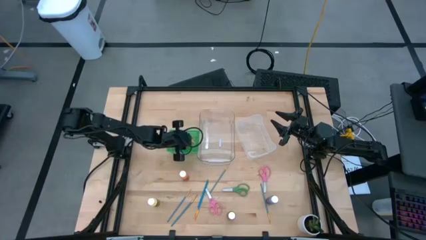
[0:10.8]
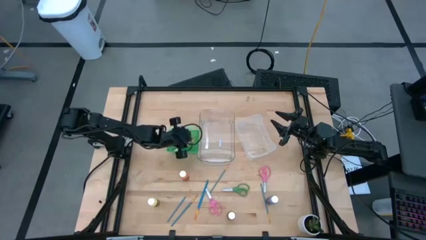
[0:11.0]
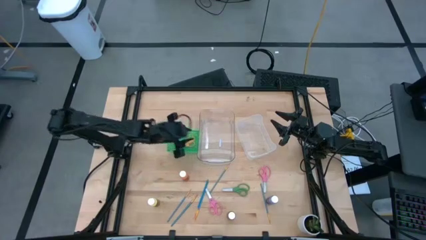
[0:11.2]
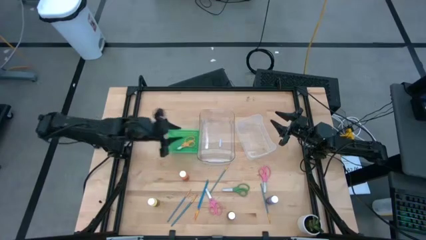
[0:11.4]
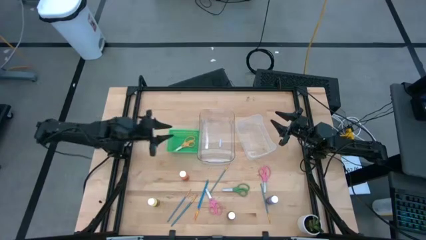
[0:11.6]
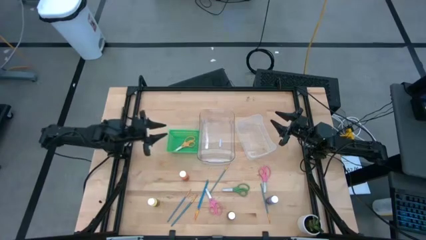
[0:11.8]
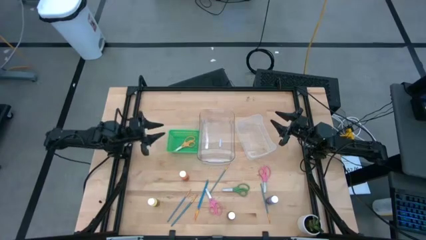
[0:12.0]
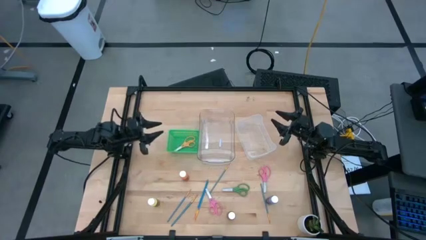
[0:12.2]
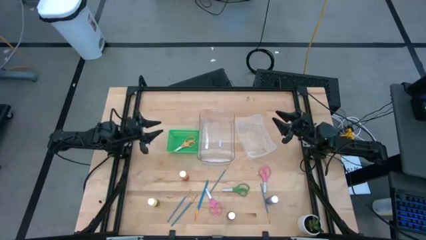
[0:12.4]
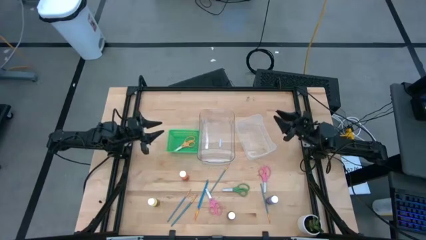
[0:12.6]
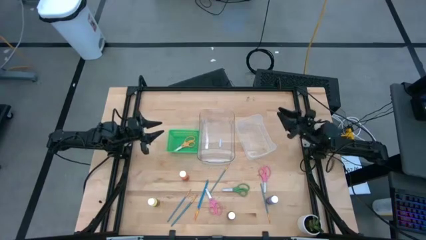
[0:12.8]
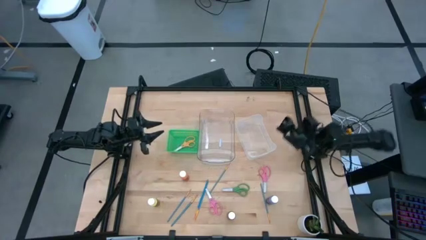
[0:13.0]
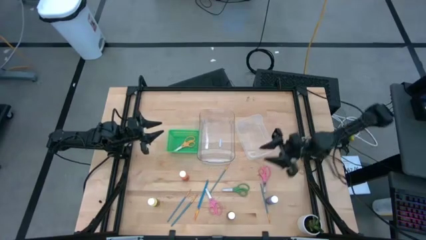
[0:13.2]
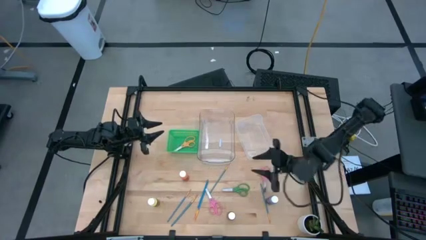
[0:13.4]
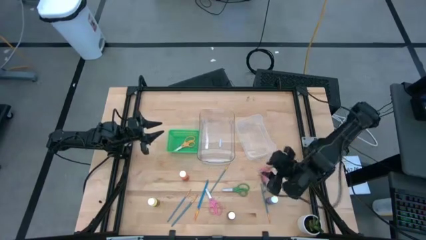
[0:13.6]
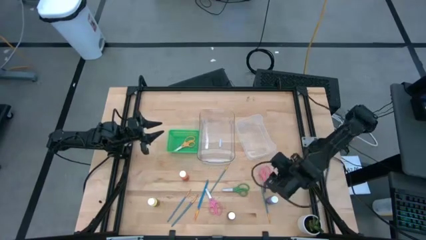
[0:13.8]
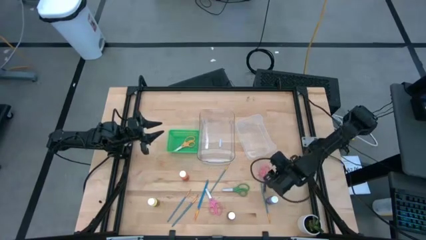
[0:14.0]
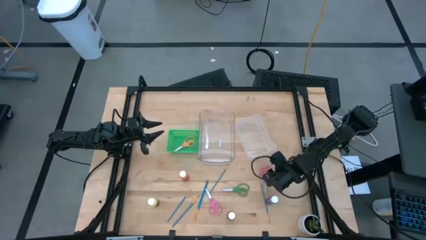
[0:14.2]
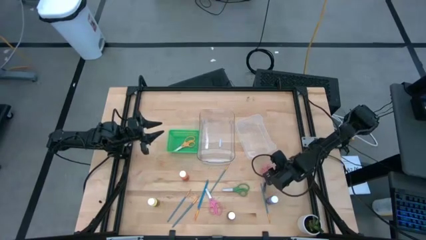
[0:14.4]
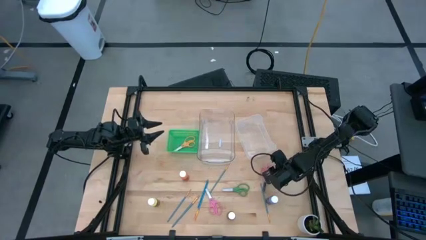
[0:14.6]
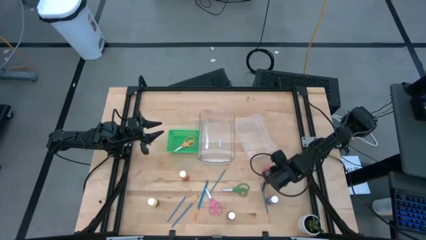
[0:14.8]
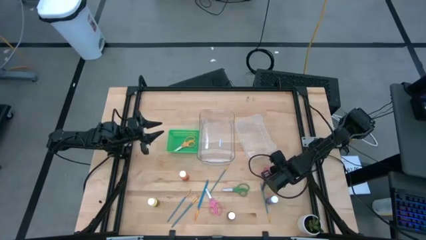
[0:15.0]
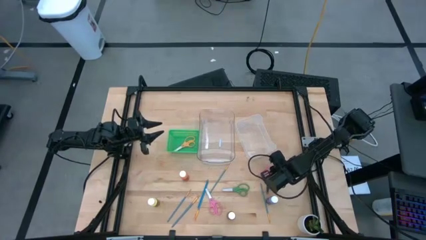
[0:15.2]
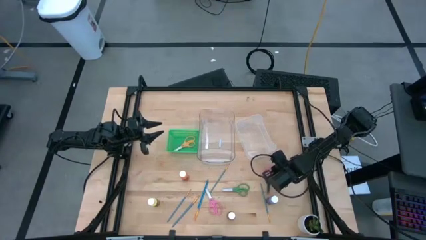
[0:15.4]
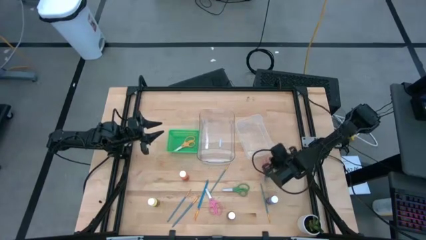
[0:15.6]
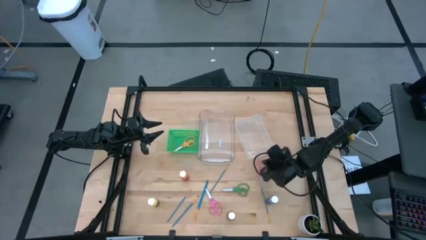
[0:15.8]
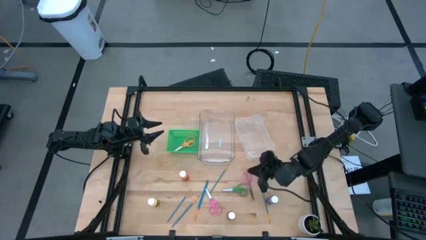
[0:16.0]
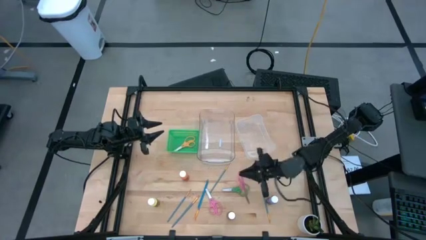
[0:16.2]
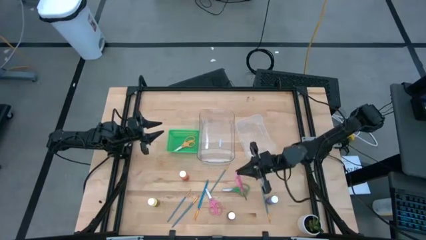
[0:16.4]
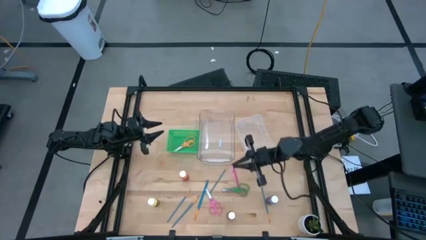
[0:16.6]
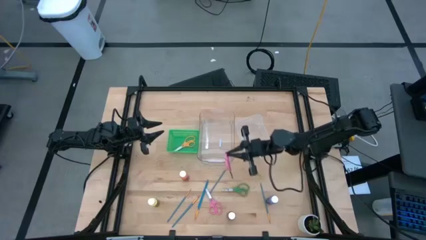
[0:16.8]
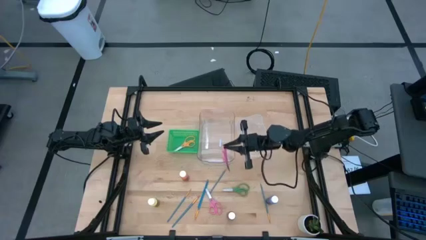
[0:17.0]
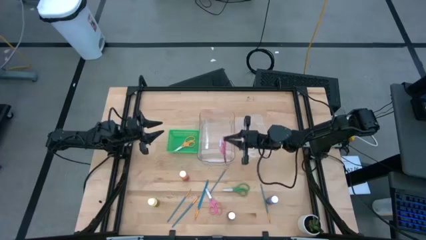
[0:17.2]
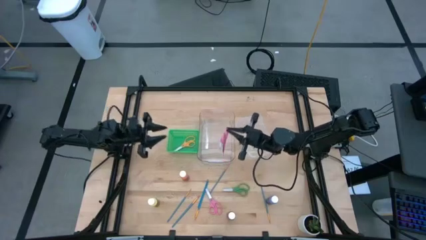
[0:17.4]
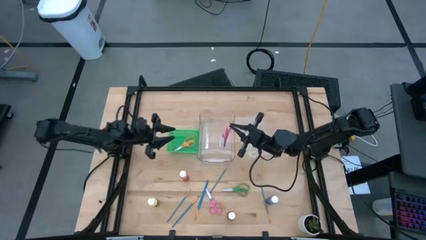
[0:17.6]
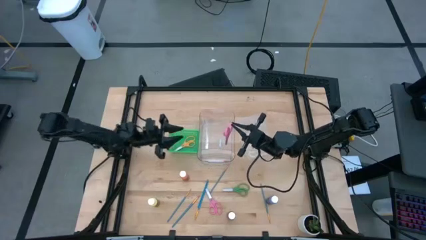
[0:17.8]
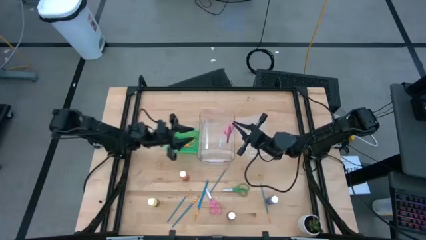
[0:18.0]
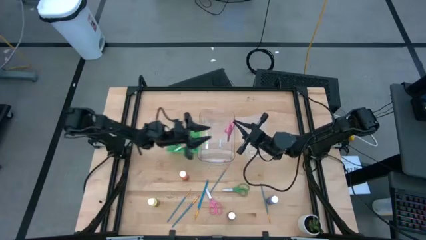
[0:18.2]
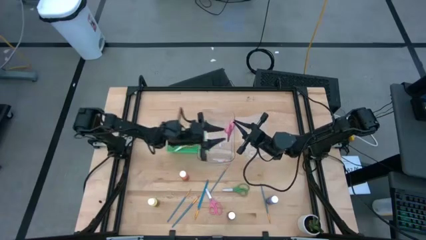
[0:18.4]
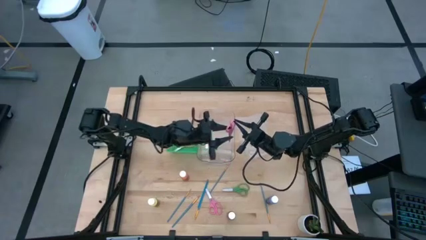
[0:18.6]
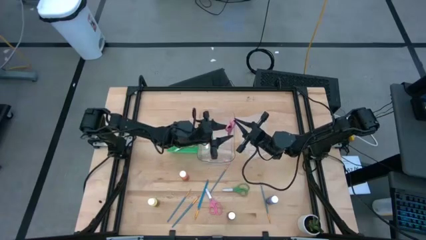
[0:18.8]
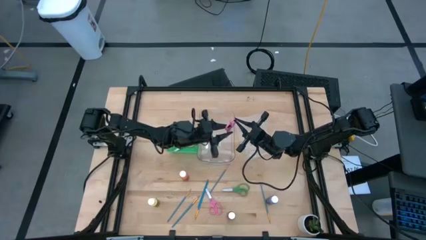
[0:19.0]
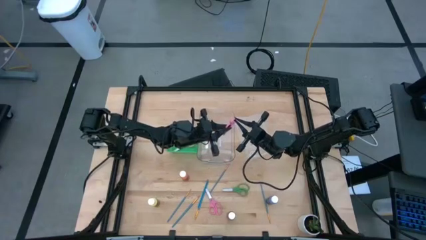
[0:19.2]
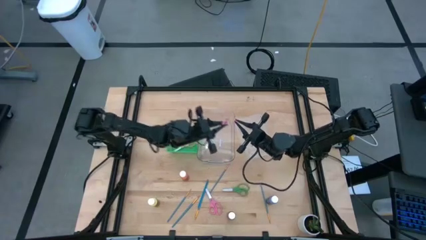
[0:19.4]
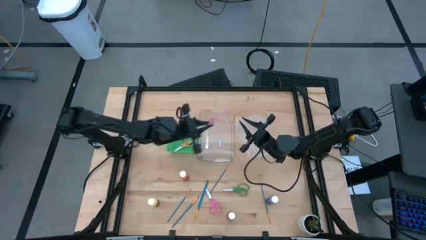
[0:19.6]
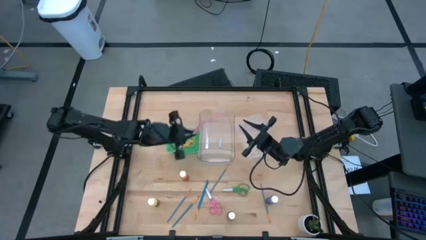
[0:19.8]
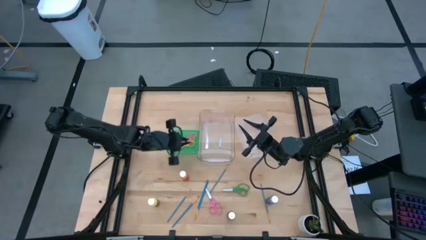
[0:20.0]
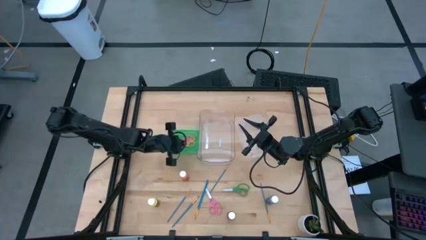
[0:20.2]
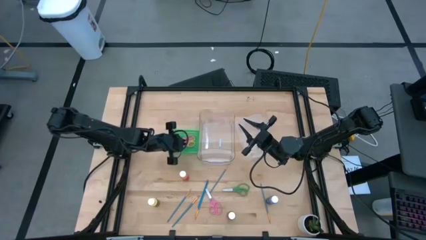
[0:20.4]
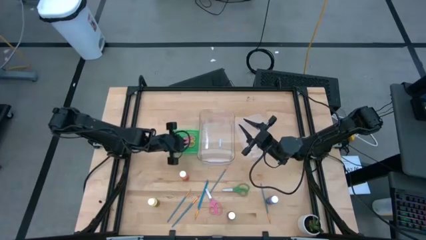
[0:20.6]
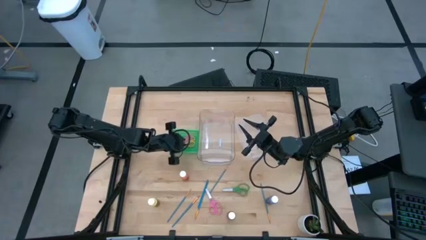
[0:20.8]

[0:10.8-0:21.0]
Task: Pick & Place Paint Supplies
Put the pink scissors into the green bin

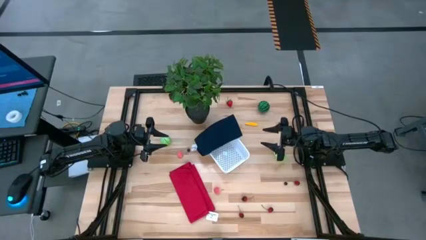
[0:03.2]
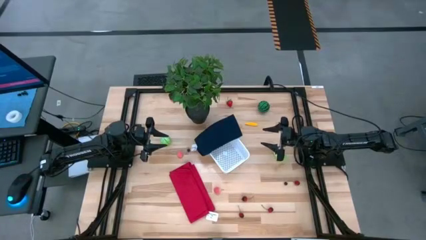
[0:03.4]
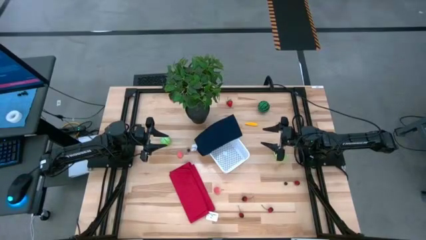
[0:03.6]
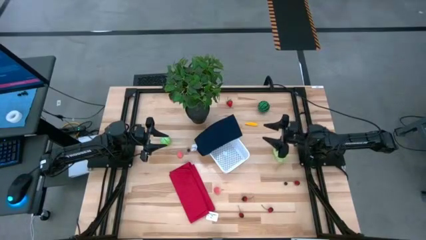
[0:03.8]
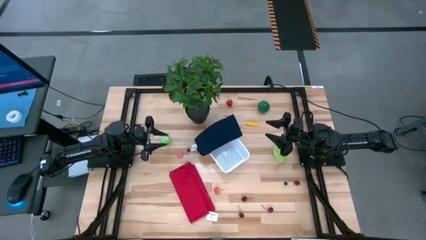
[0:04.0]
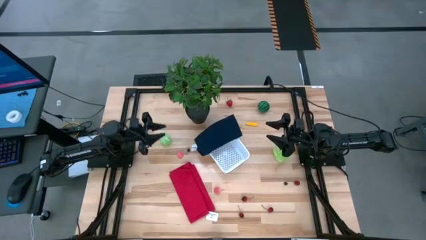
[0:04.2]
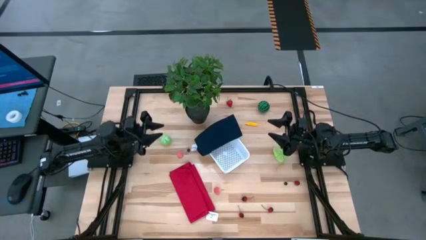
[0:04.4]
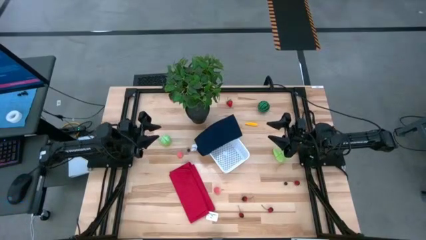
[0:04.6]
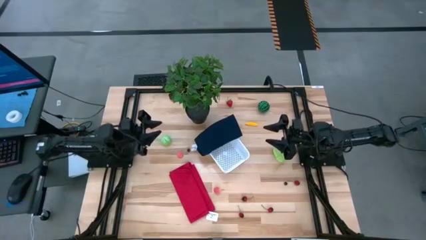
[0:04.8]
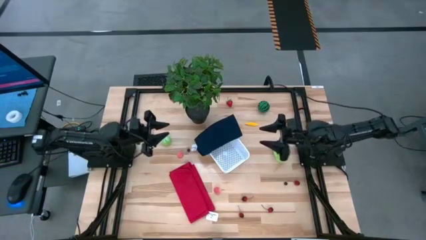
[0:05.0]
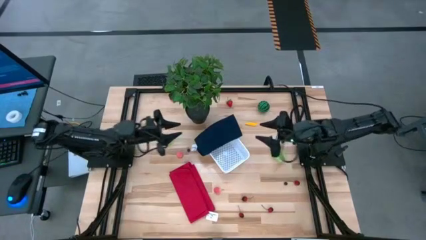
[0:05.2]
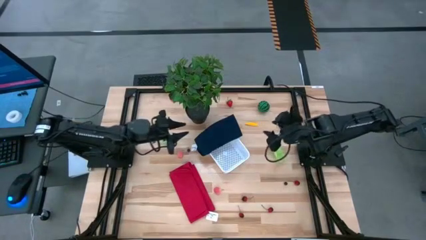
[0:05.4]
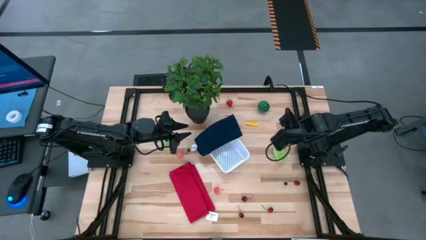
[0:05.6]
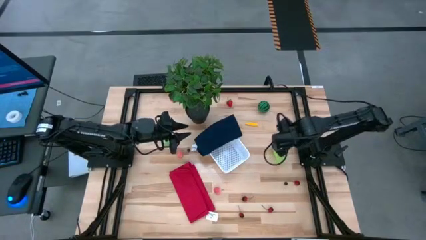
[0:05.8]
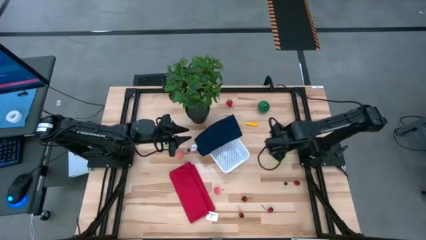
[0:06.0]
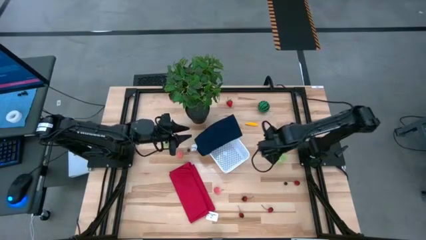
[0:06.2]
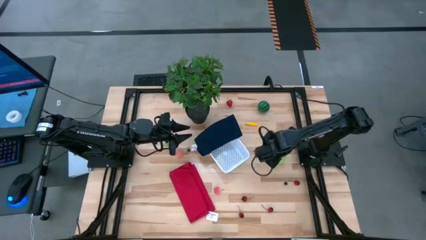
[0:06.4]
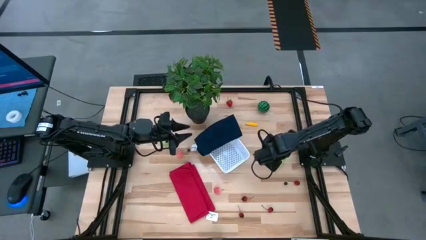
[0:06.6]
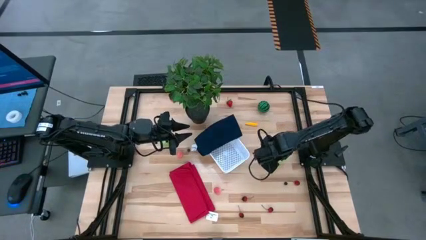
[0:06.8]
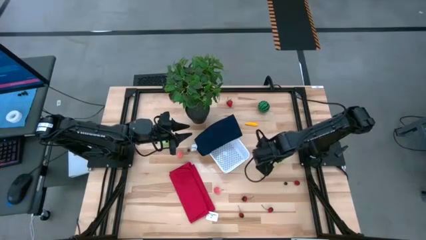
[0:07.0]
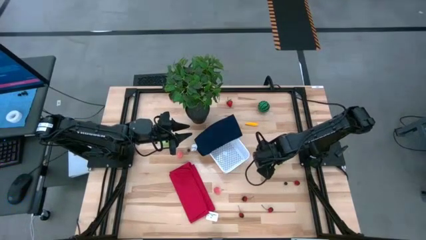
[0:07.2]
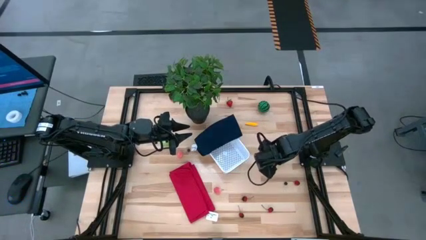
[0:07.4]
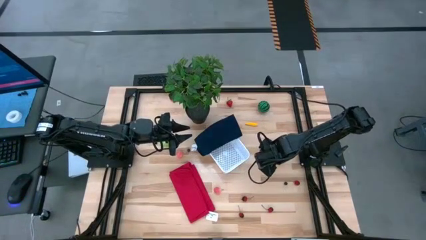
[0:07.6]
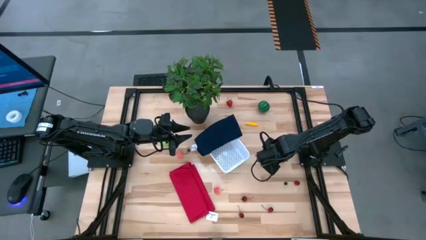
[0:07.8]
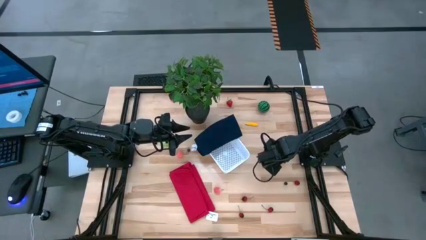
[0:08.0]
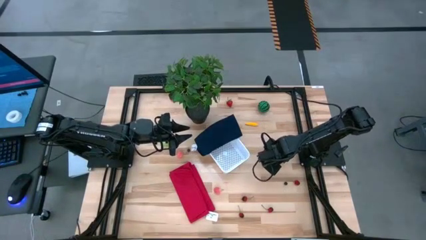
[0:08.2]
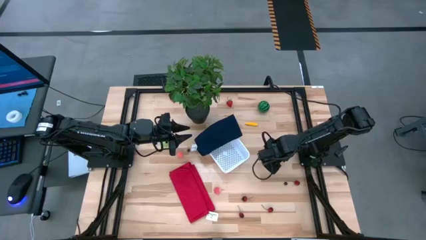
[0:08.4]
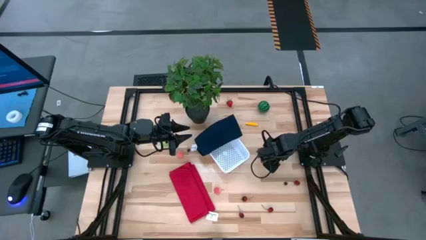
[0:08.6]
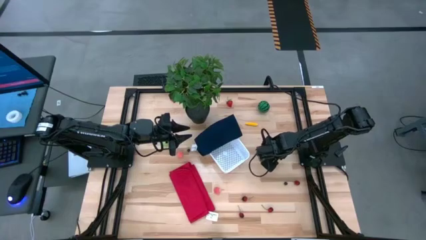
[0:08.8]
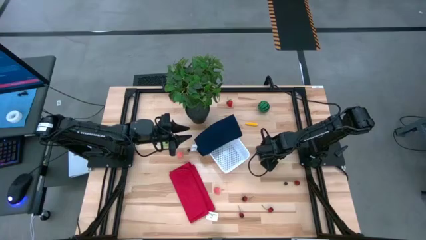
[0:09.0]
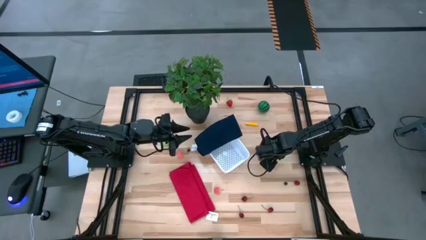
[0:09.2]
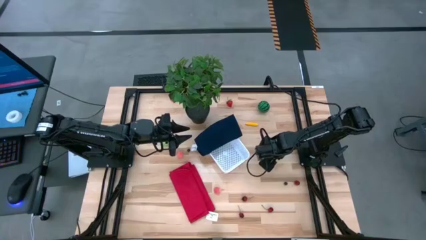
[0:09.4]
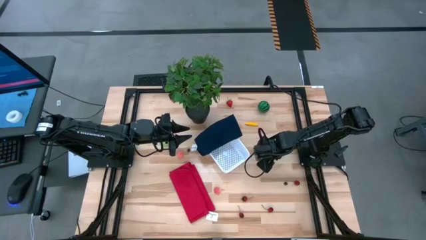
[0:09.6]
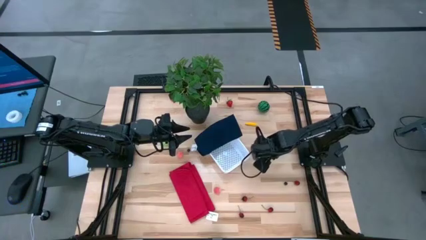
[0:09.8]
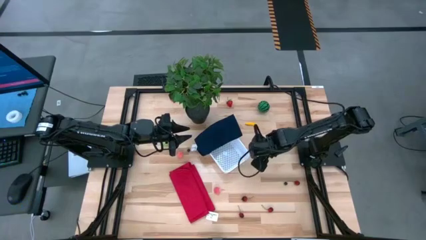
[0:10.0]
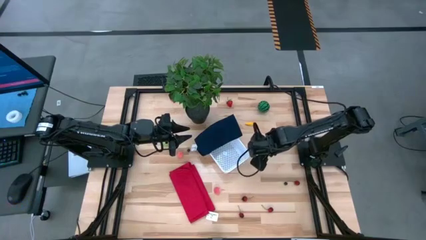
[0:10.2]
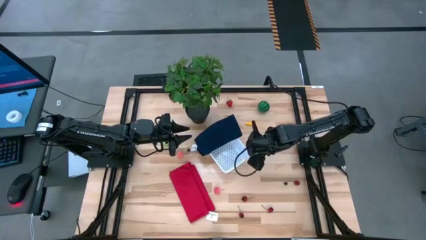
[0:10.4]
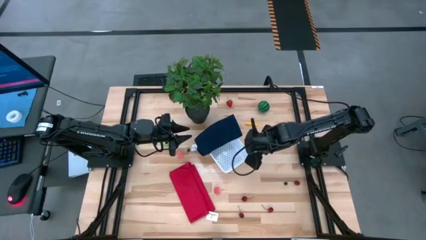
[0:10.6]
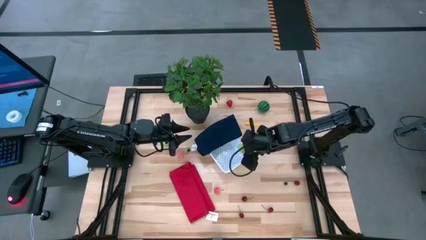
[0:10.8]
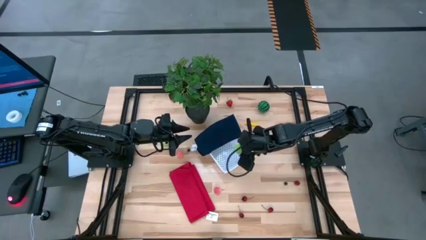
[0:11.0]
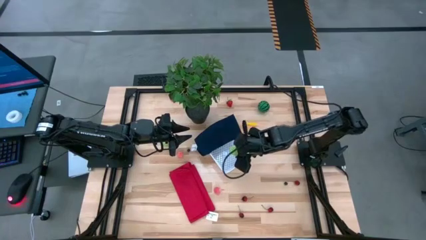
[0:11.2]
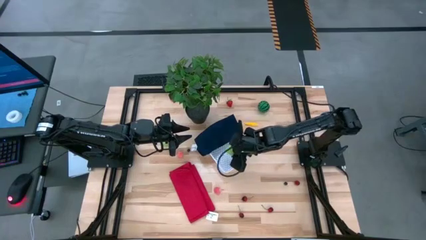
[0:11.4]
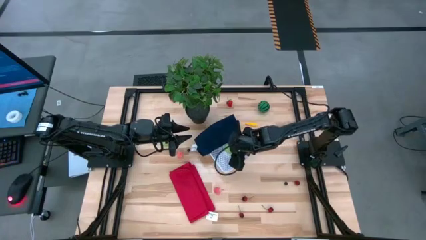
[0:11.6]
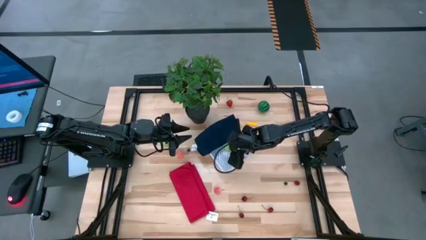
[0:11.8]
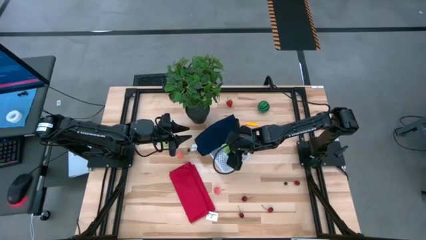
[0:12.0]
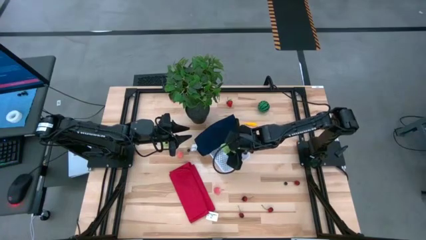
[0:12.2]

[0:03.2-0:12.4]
Task: Pick and placing Produce into tupperware
Put the star fruit into the bin
